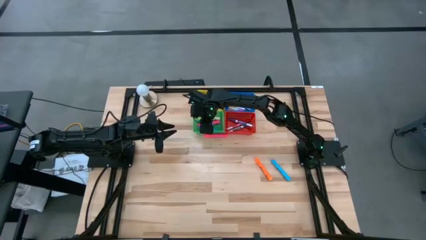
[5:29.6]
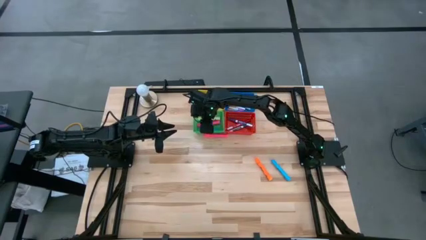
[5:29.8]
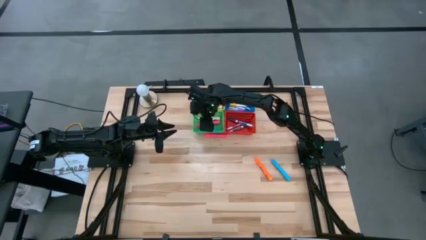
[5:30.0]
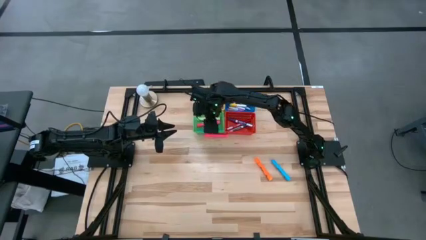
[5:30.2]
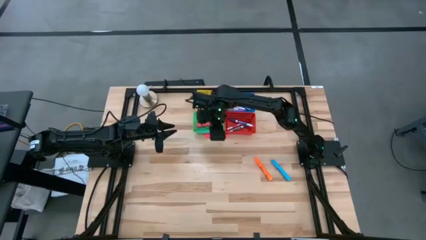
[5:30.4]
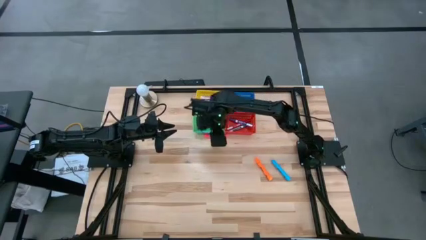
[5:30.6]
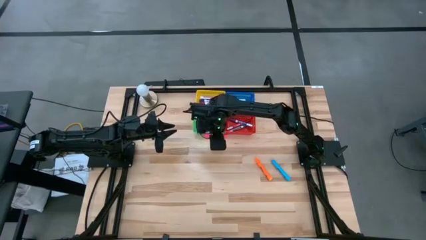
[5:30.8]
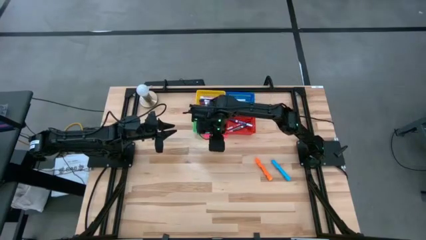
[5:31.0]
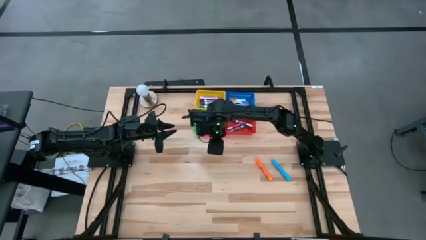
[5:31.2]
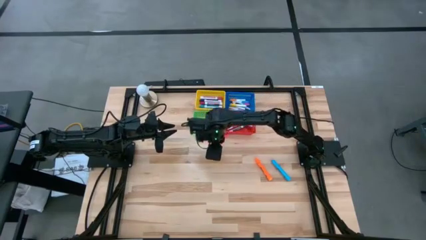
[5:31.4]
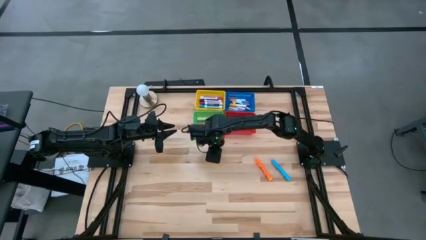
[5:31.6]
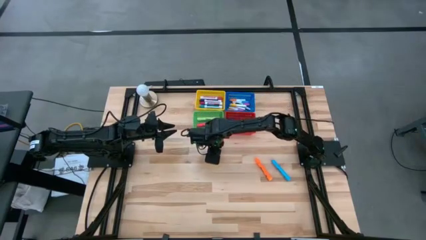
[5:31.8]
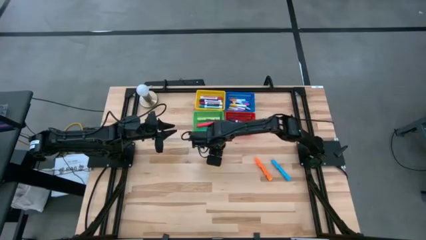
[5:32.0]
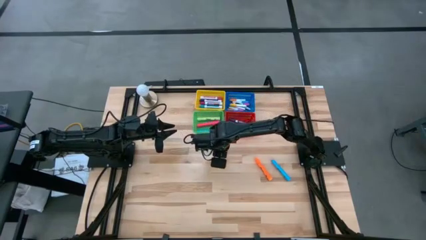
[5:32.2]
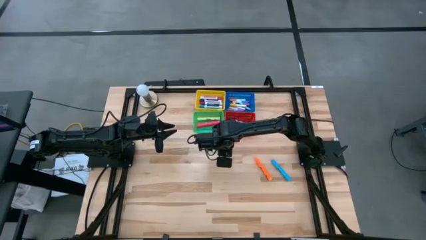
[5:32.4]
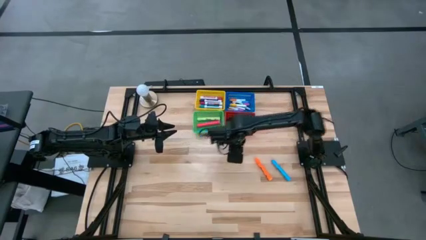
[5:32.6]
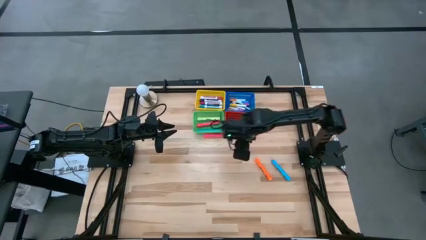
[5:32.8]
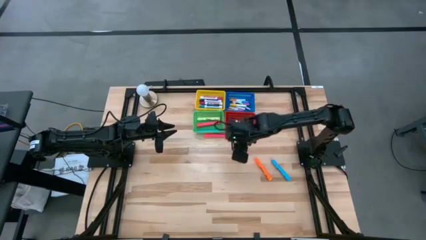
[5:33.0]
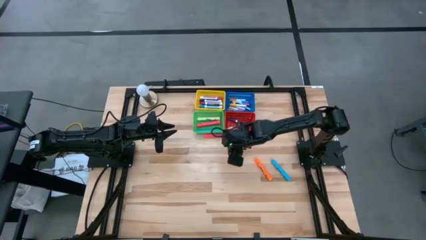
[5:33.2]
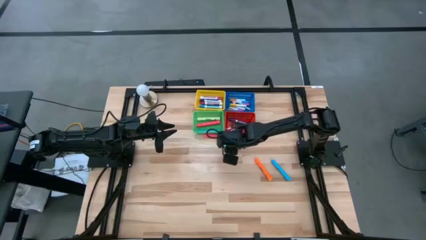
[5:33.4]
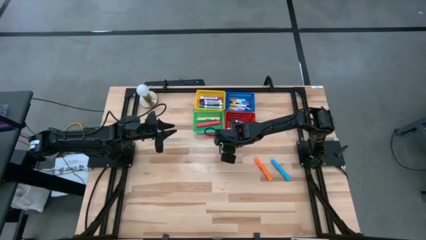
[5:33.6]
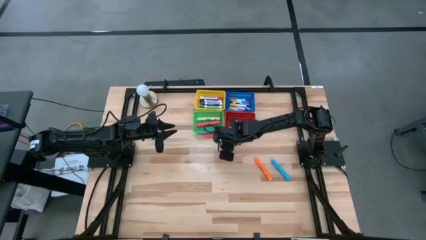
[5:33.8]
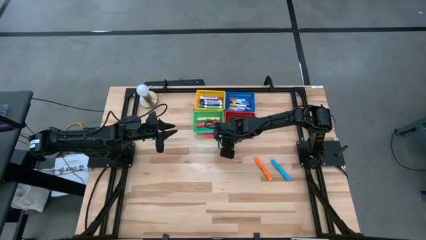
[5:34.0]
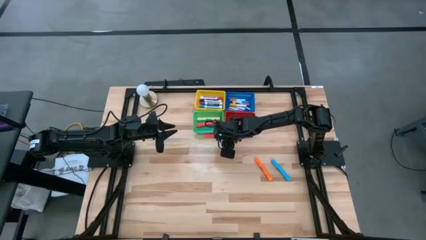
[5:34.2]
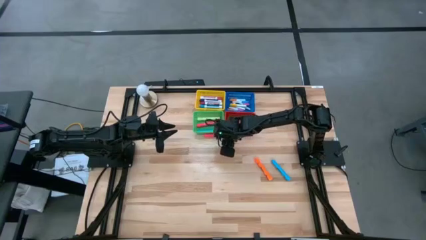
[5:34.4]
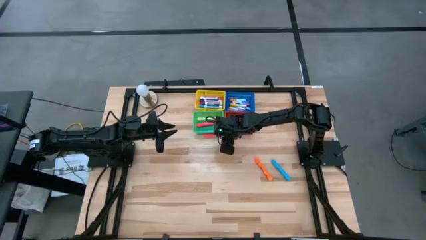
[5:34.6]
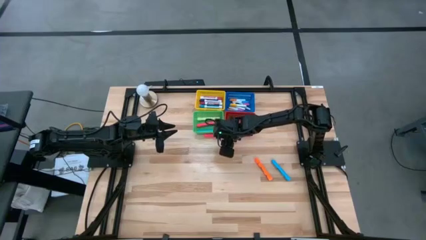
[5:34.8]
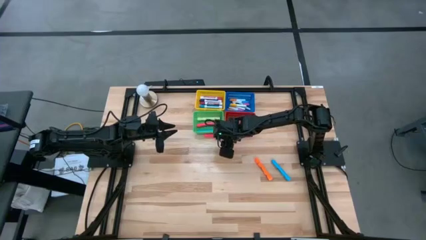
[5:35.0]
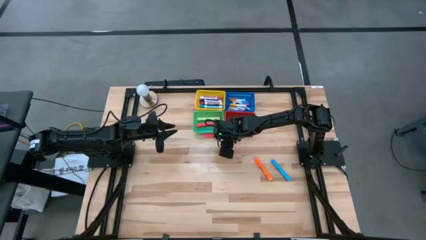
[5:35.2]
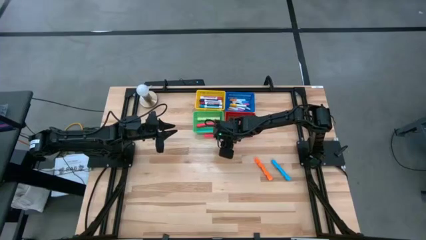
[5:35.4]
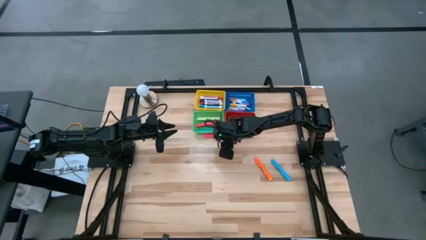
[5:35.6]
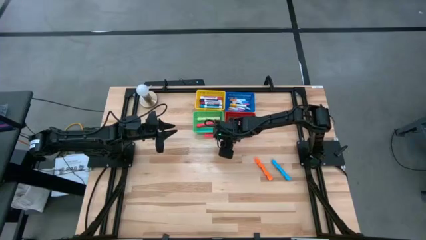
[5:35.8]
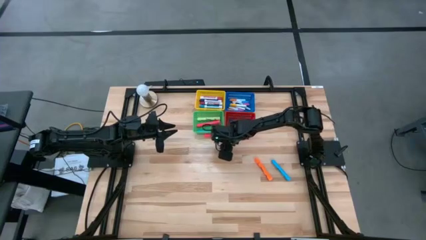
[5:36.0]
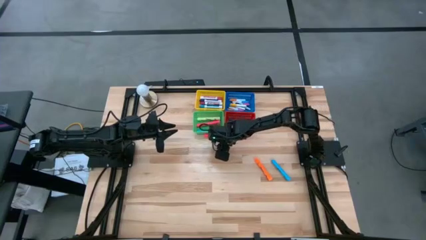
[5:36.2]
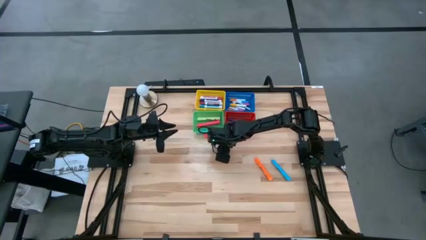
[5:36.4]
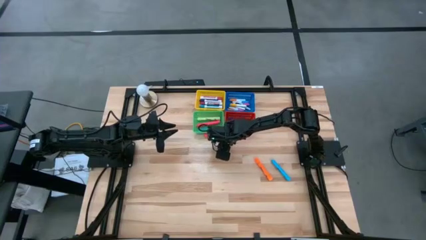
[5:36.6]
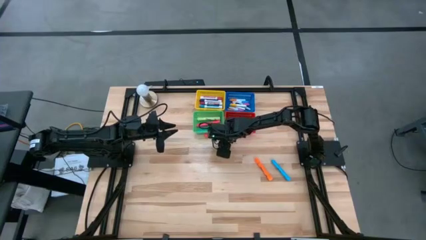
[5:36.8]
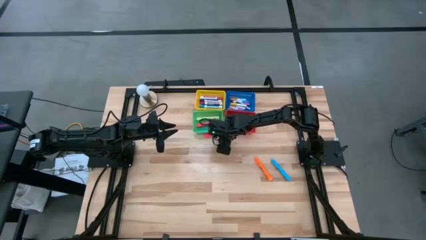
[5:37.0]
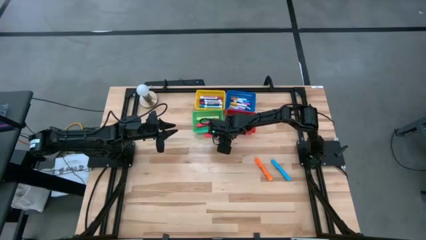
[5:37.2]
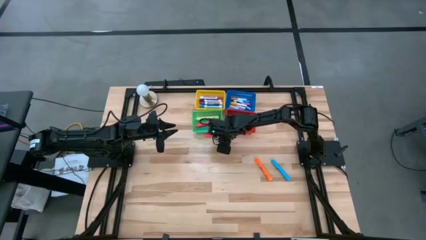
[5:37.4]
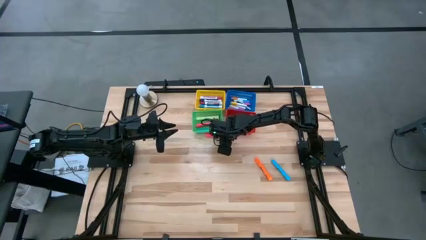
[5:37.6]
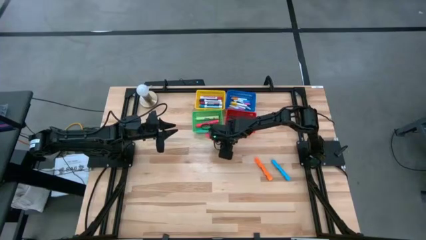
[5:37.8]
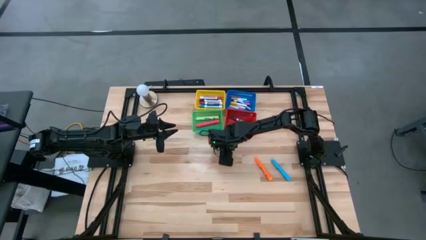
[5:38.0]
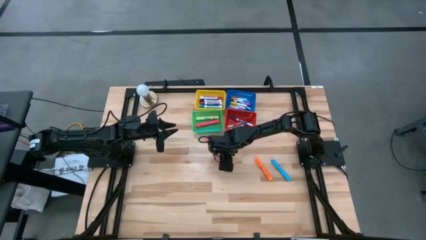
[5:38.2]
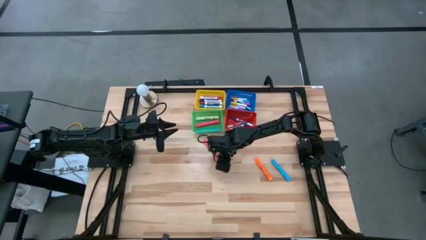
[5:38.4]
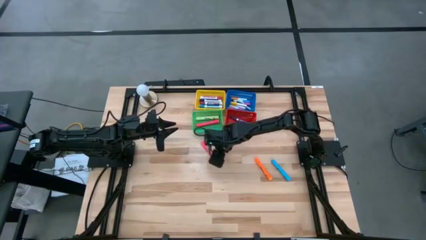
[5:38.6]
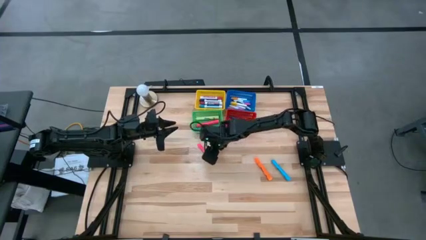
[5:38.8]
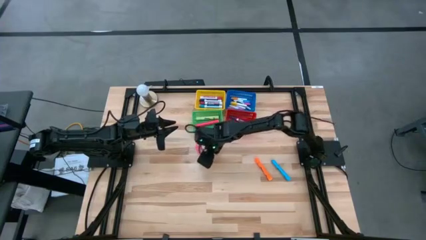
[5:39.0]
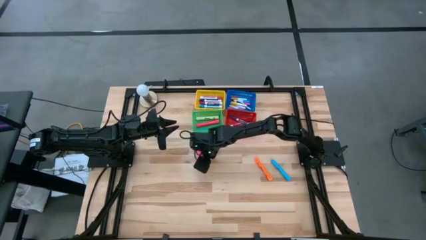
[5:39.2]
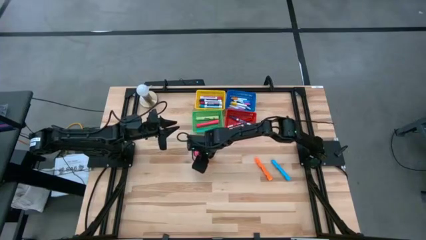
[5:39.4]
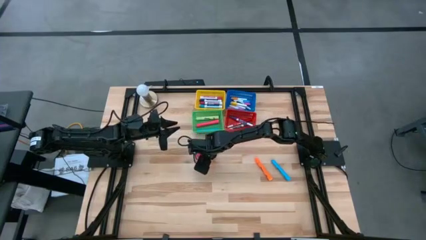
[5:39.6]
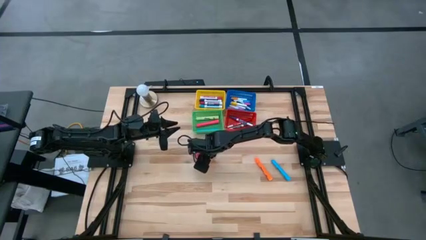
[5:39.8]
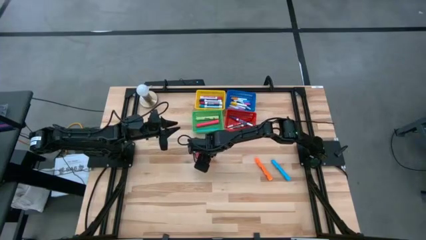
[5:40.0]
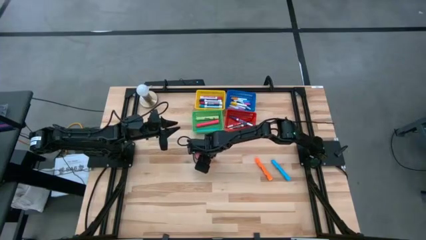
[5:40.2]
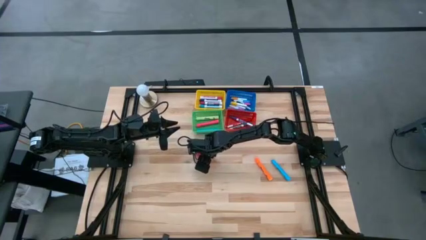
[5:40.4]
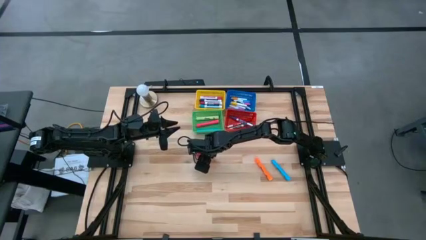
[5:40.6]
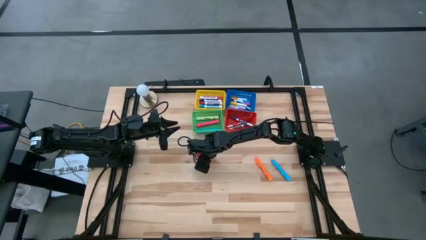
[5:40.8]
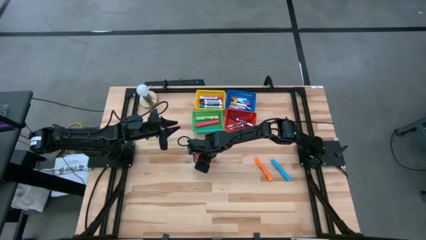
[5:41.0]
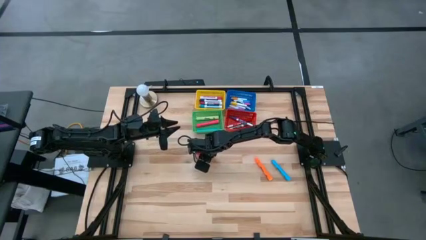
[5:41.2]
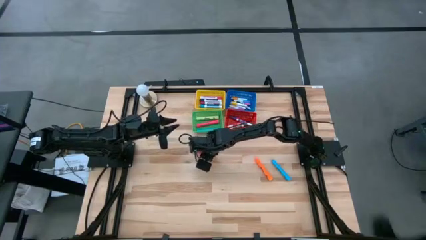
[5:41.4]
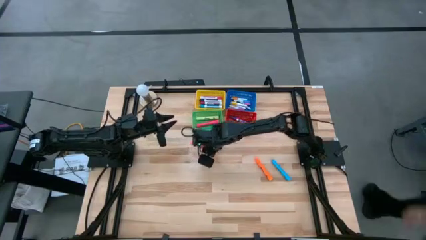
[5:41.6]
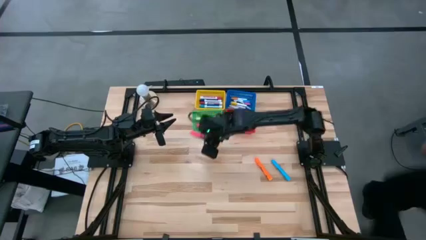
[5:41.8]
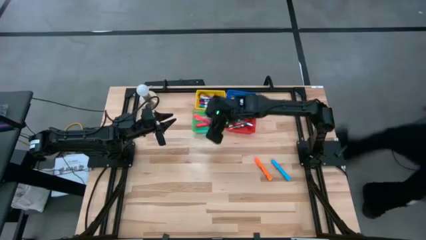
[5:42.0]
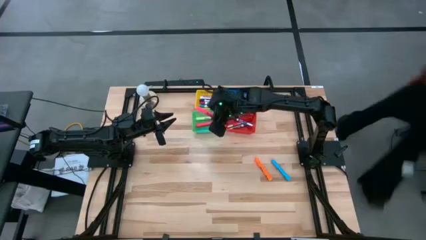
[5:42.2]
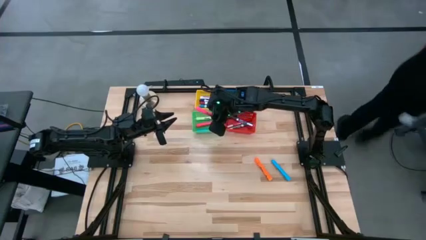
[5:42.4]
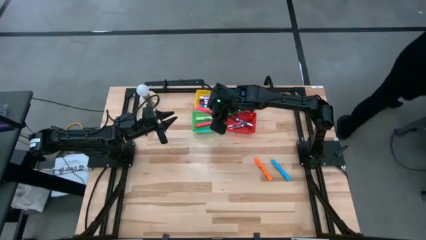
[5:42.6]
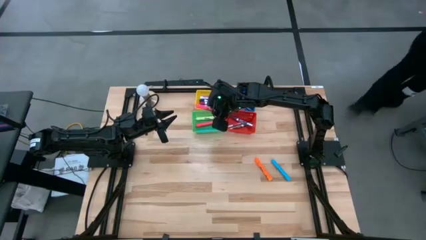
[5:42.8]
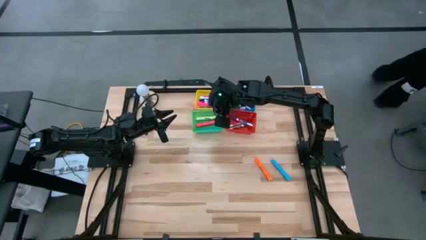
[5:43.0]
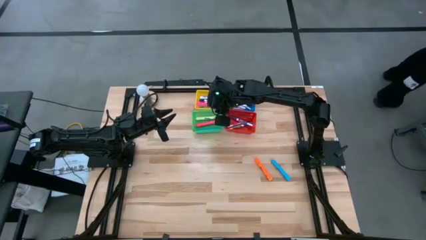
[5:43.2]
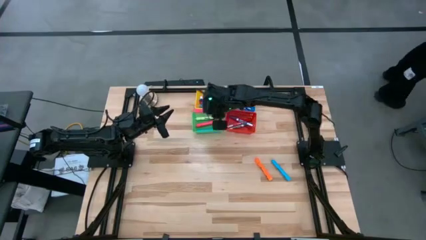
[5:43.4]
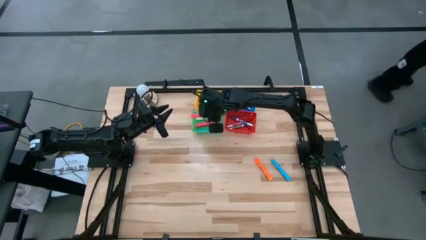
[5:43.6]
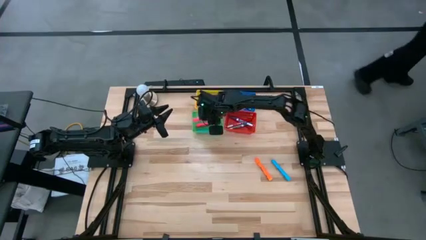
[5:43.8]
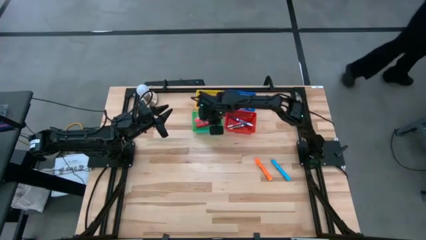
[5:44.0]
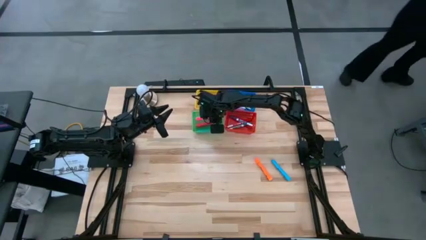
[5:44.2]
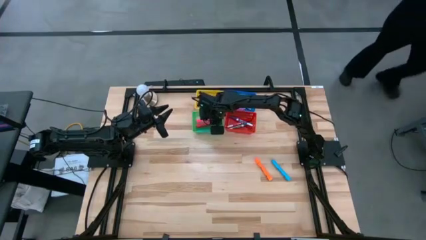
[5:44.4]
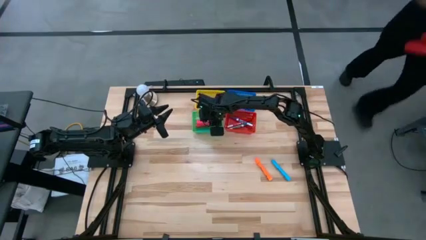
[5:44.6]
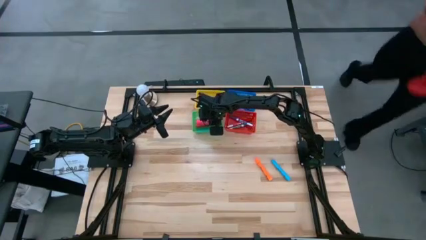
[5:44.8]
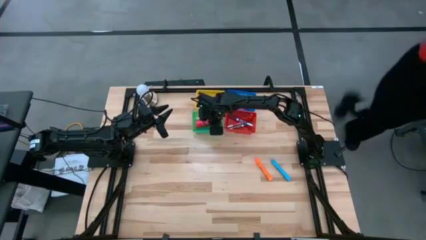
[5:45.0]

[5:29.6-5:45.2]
Task: Pick & Place Markers
Put the large pink highlighter pen into the green bin
